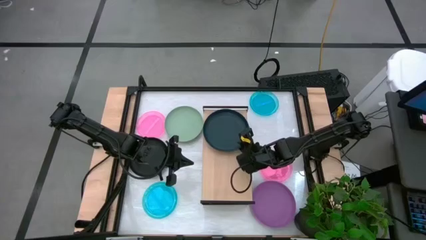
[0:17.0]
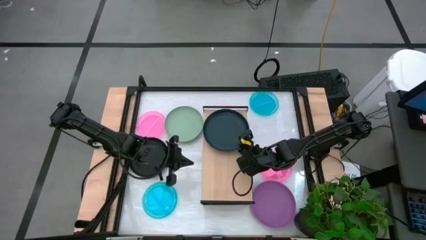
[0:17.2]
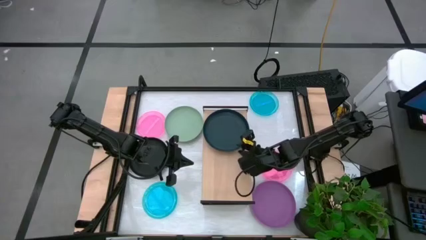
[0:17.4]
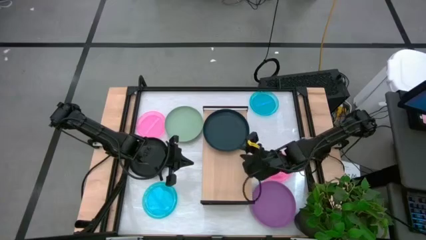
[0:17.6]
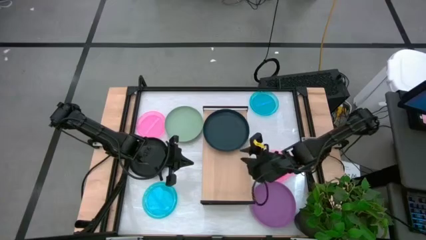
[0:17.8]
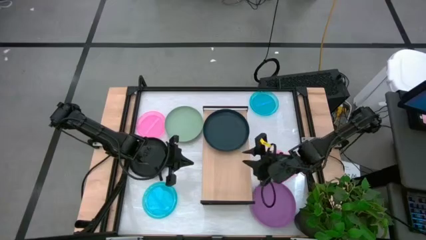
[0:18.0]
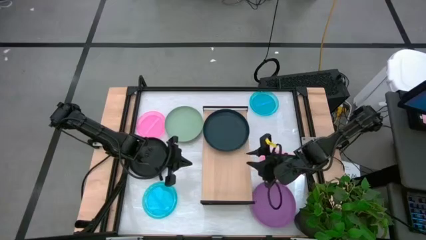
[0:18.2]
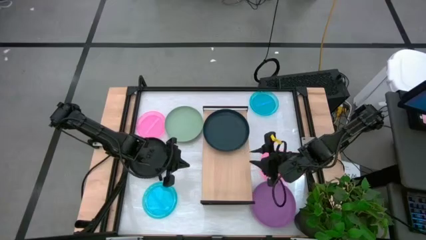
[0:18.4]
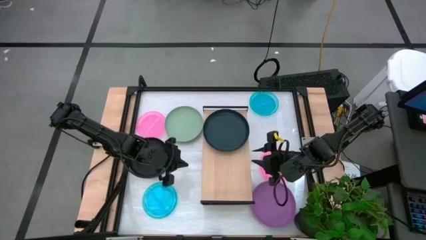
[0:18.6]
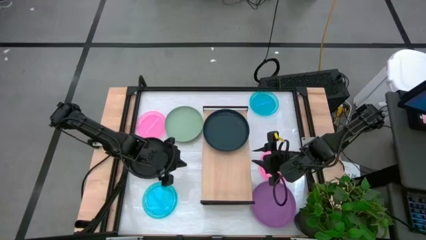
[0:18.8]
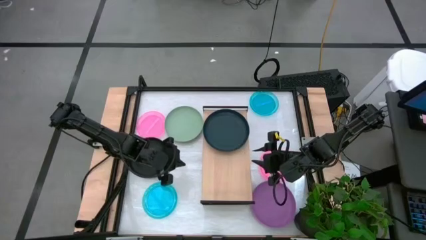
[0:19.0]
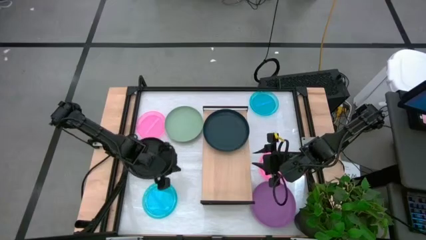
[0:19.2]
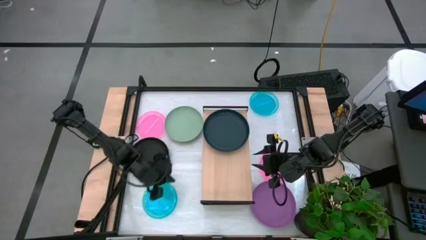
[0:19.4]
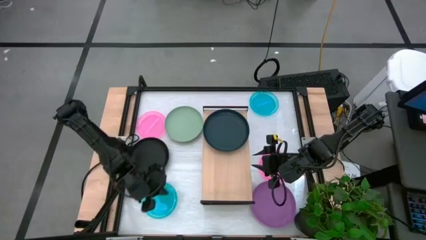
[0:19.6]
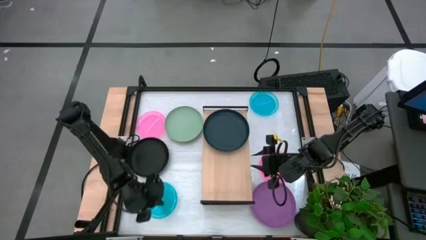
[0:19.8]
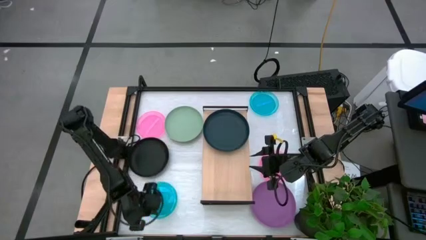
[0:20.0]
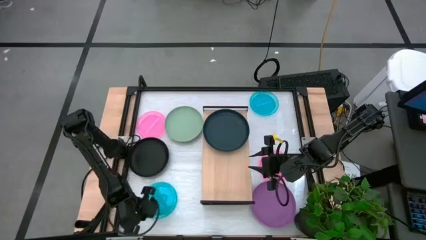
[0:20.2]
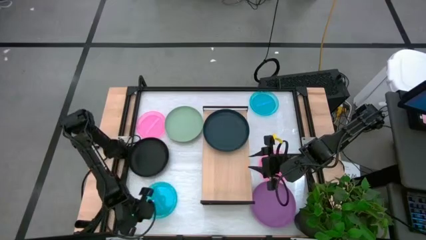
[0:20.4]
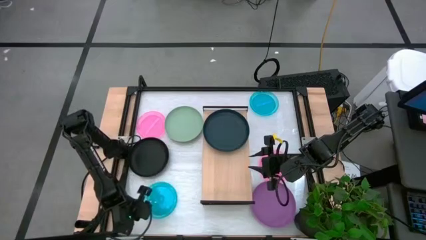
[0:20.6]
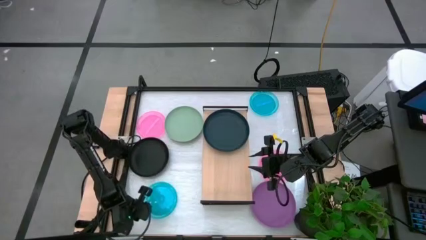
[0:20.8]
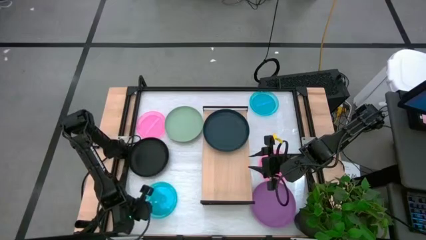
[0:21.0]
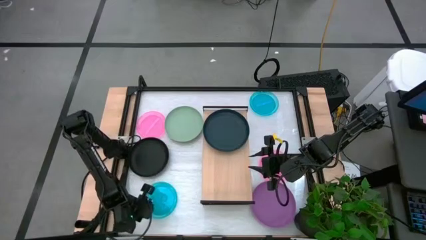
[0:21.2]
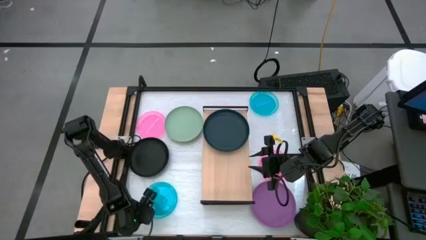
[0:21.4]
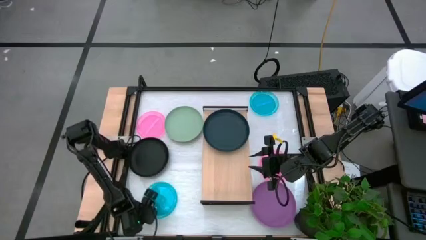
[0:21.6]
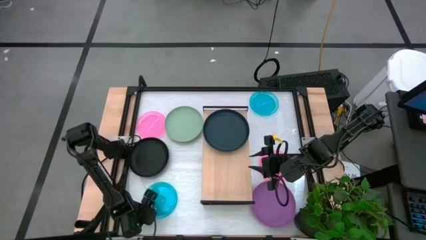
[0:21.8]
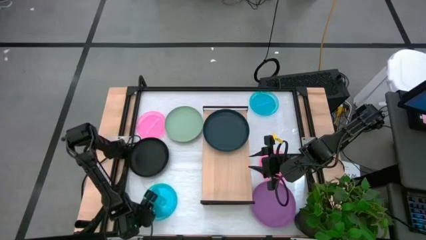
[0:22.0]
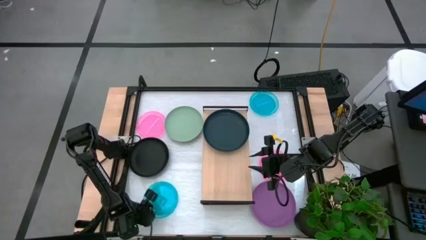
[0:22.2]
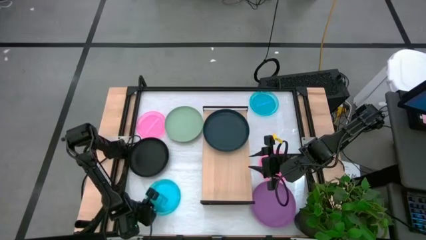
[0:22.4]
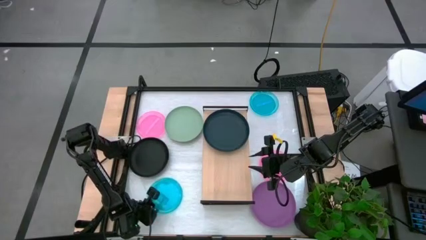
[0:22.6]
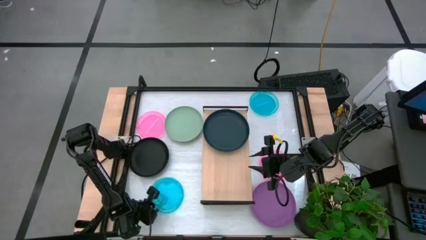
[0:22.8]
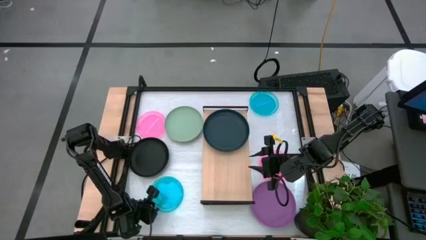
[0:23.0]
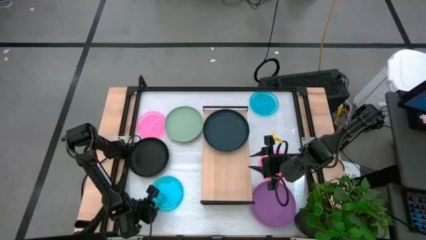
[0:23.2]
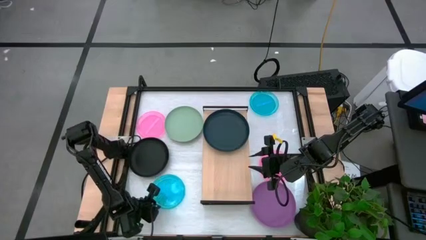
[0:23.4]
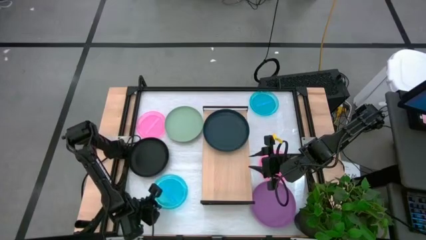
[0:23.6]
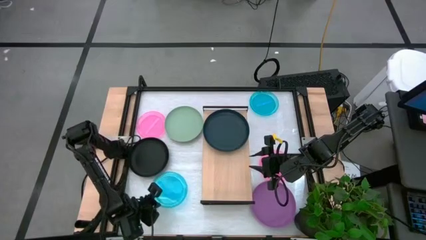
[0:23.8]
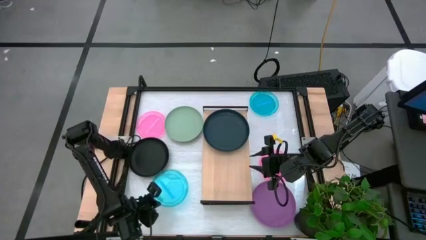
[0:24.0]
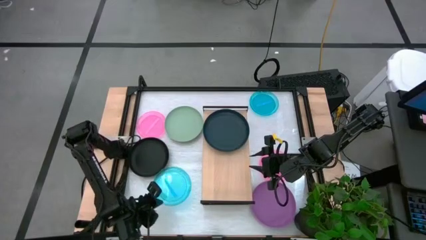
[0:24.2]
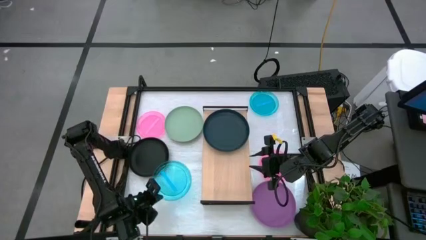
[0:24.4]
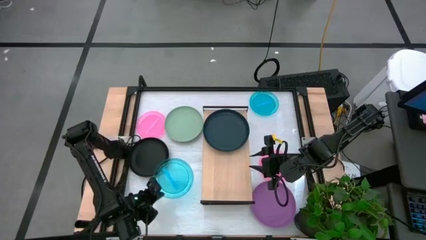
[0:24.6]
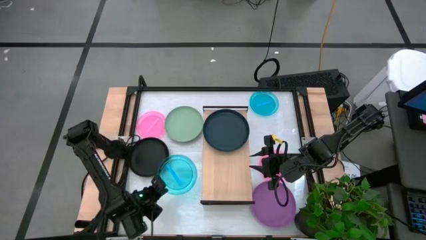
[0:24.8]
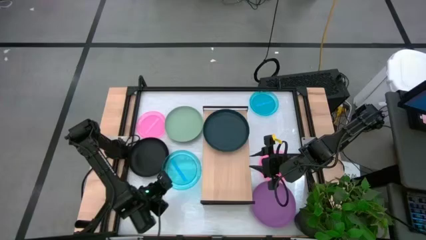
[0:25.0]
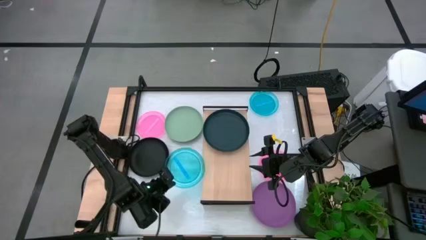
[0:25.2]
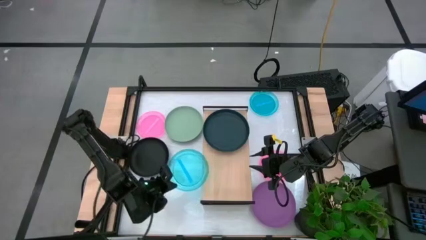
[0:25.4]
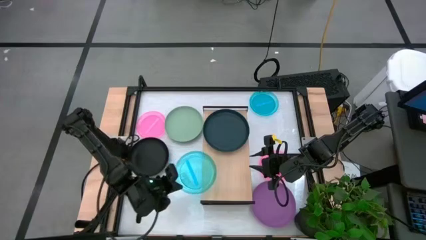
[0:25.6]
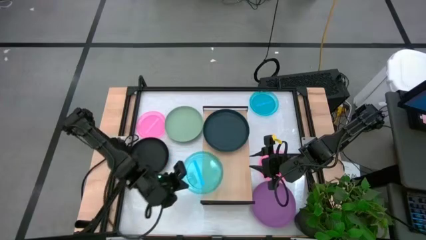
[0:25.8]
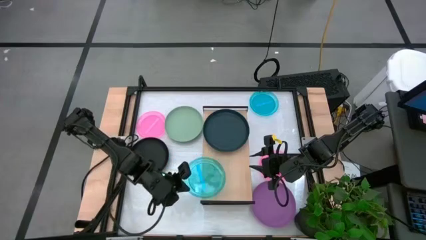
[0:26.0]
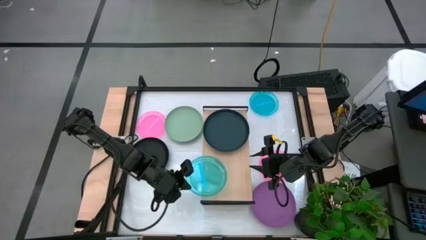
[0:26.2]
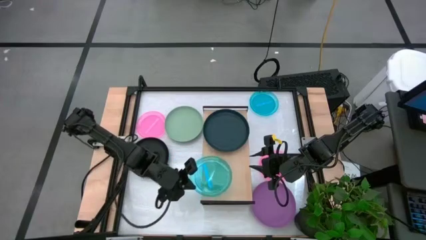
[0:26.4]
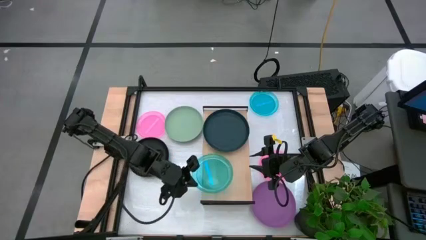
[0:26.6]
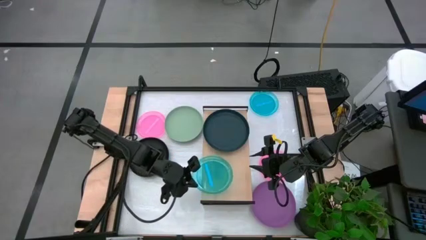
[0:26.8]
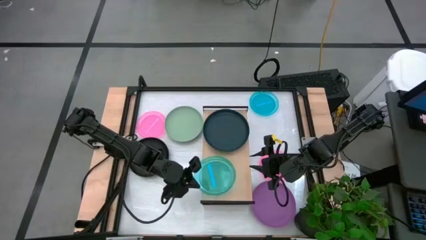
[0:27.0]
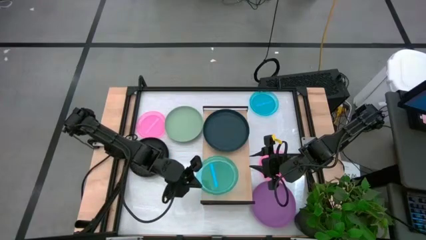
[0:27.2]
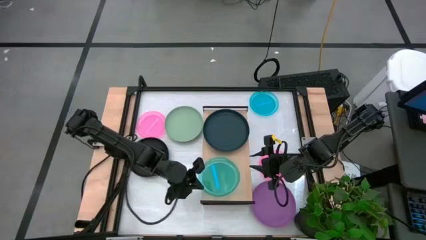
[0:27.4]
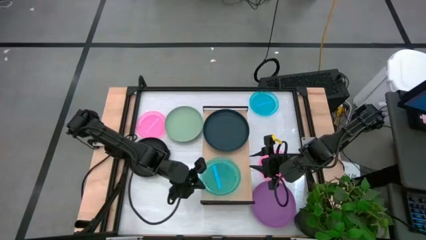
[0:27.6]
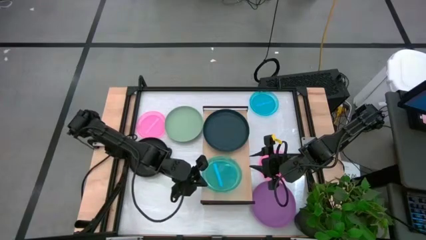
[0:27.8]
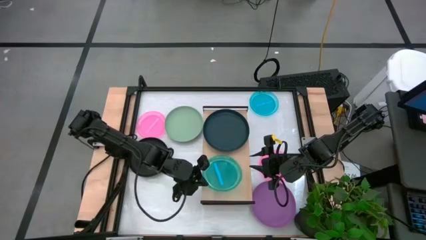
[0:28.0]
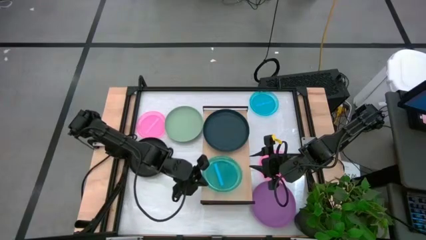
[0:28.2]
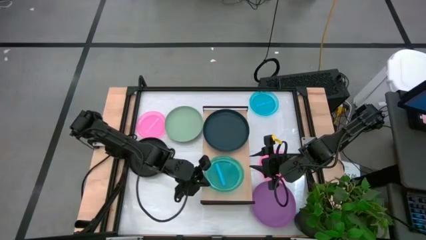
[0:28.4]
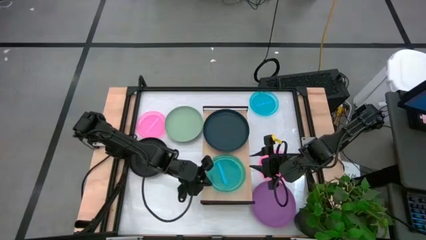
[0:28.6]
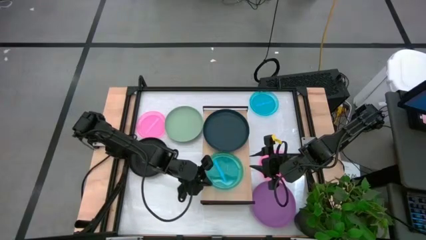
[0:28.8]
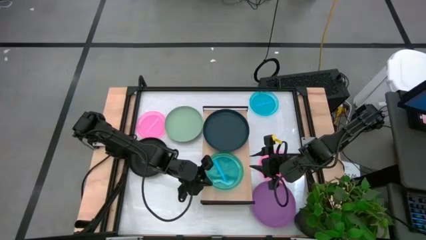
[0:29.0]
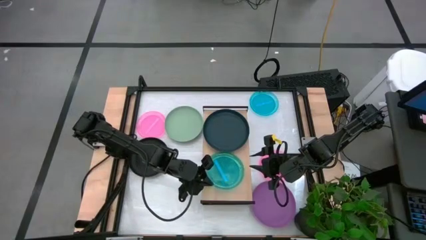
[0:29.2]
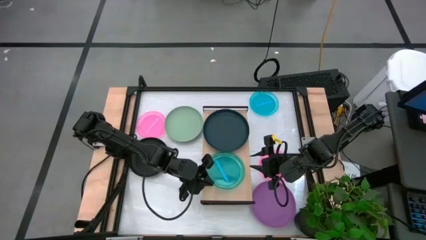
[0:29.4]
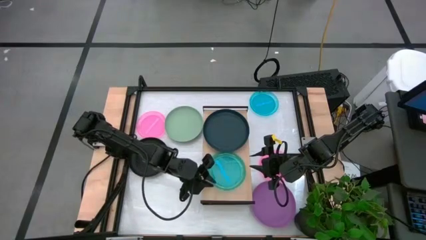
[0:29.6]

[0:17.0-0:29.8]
Task: Place and stack plates onto a shelf
Put the bottom blue transparent plate on the shelf
